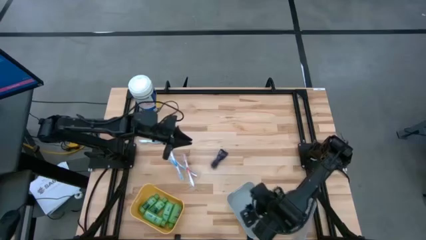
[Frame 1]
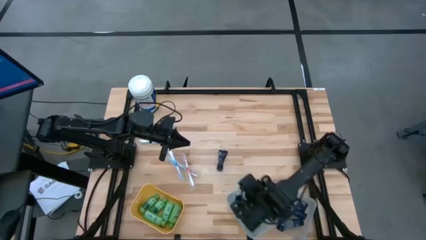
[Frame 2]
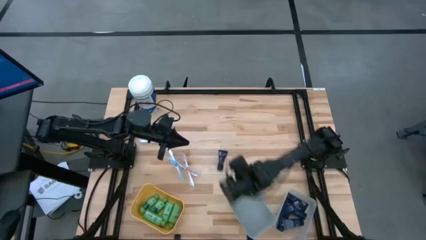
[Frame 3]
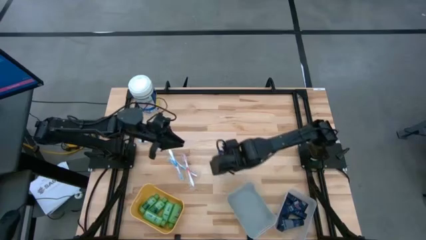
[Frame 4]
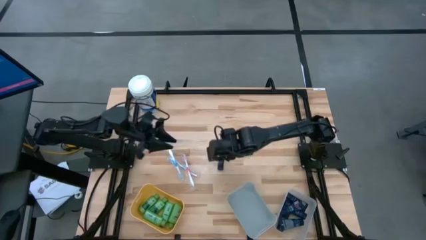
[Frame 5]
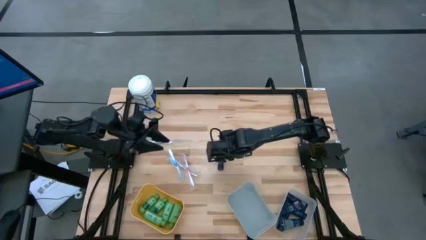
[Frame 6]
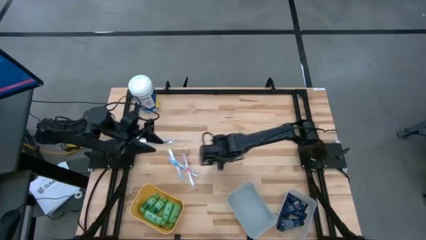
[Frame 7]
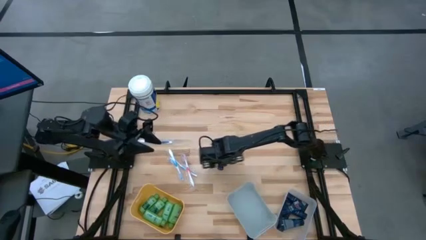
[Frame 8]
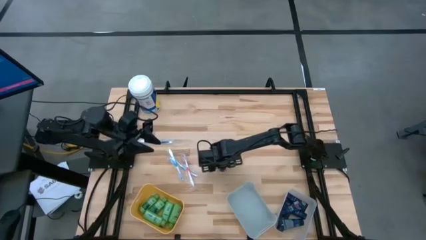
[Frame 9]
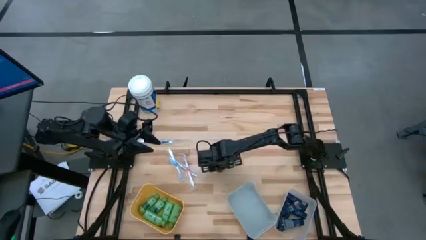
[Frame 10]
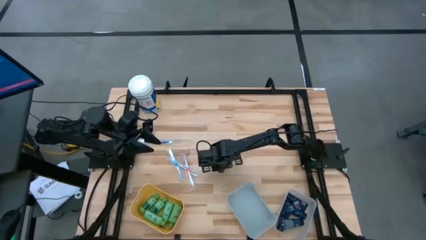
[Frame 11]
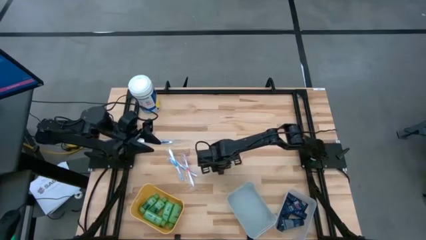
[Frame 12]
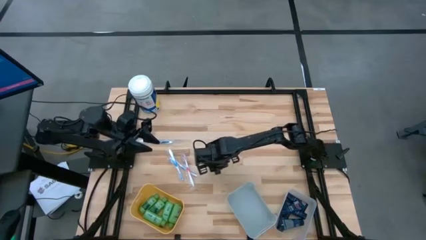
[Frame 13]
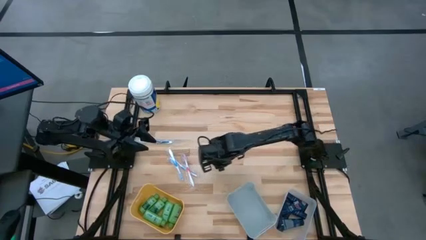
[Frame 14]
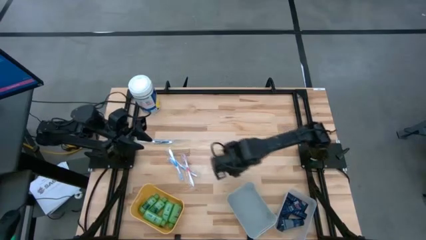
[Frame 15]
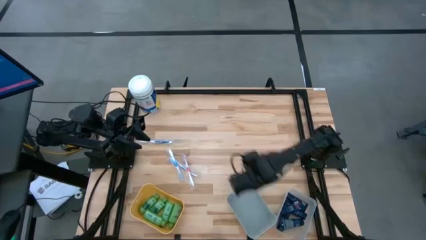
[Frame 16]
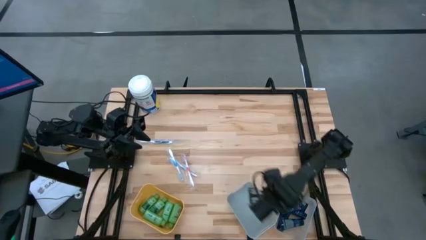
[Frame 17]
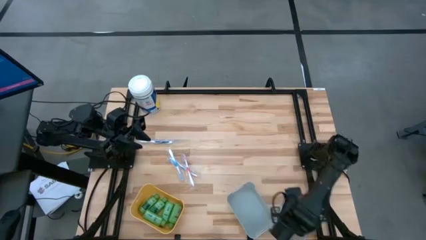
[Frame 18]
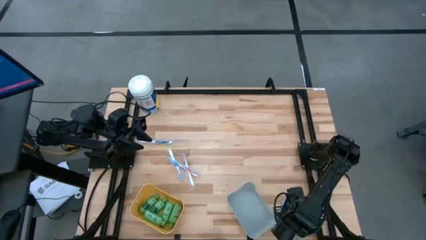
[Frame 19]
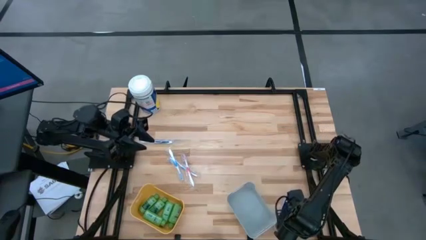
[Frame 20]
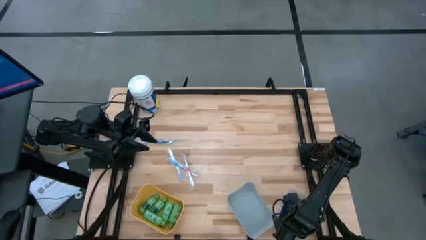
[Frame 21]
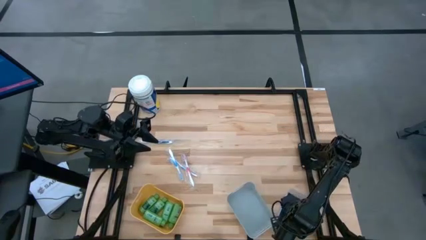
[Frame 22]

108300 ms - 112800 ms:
Task: Pick & Place Travel size toiletries
Put the blue shave cream into the transparent bin

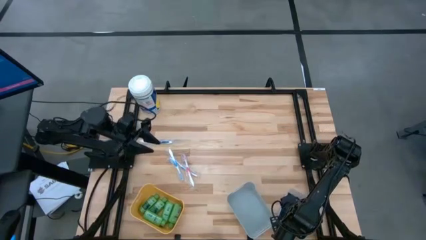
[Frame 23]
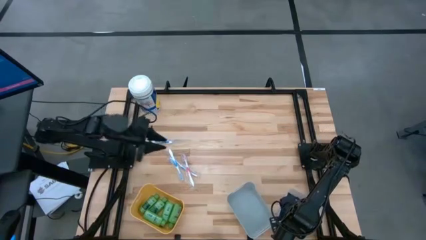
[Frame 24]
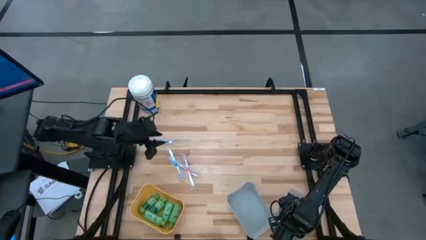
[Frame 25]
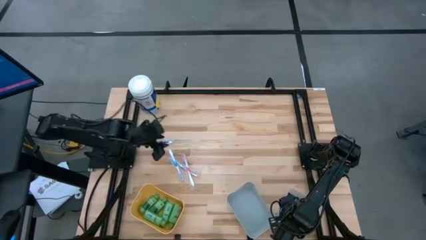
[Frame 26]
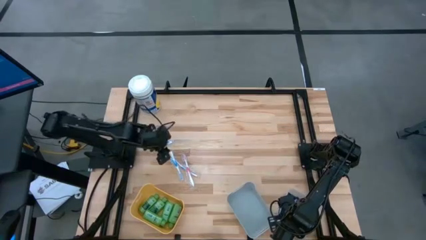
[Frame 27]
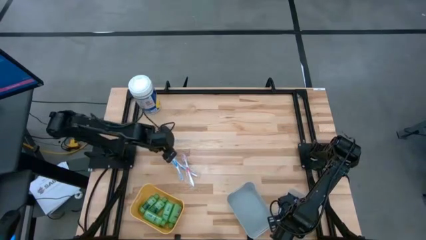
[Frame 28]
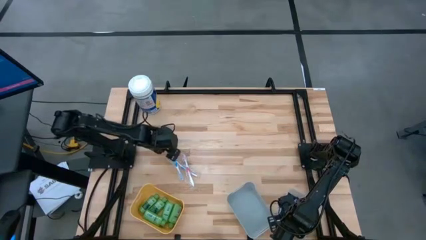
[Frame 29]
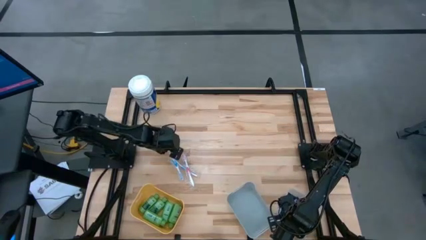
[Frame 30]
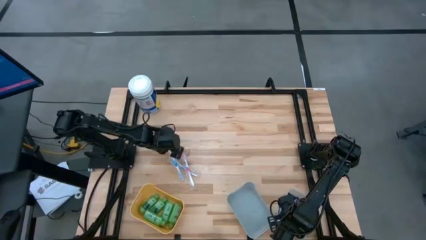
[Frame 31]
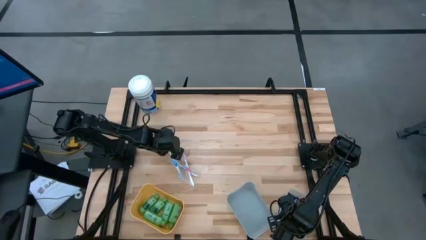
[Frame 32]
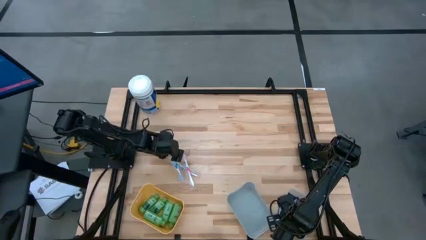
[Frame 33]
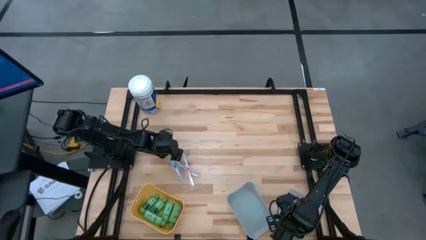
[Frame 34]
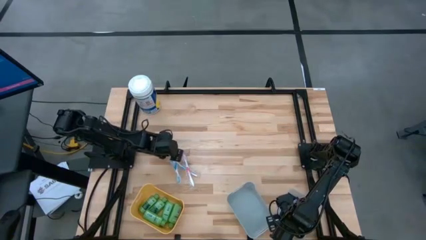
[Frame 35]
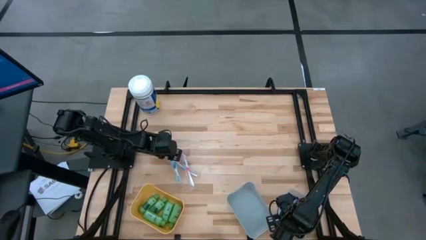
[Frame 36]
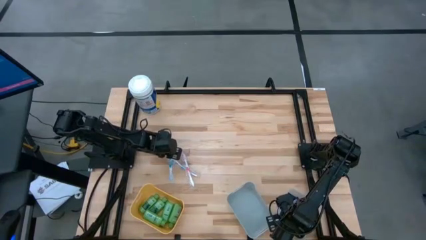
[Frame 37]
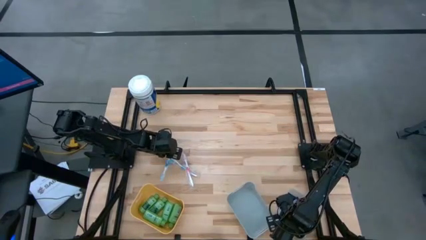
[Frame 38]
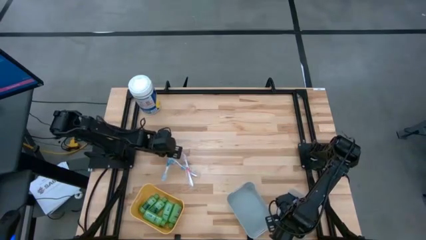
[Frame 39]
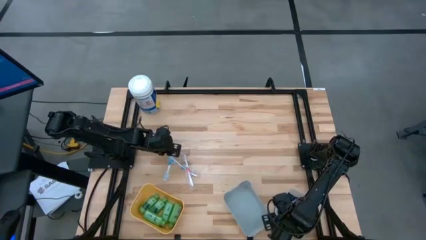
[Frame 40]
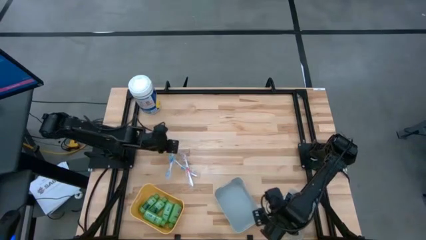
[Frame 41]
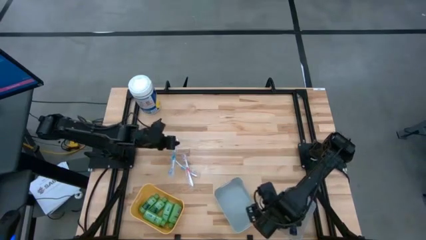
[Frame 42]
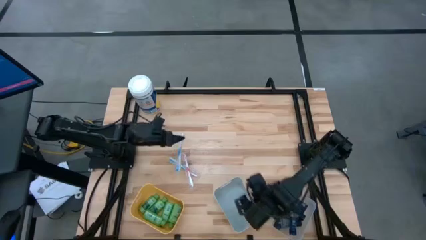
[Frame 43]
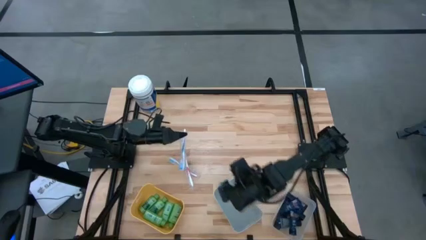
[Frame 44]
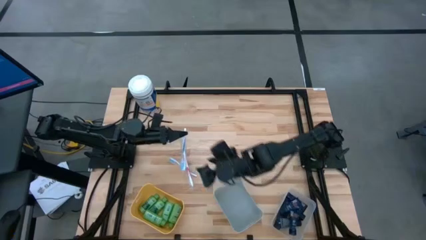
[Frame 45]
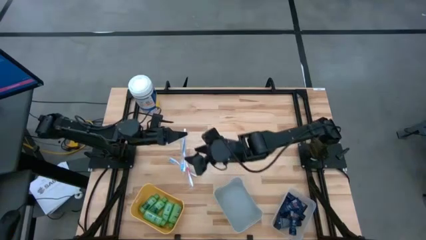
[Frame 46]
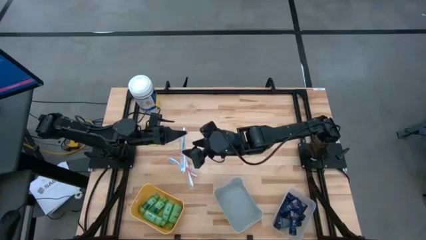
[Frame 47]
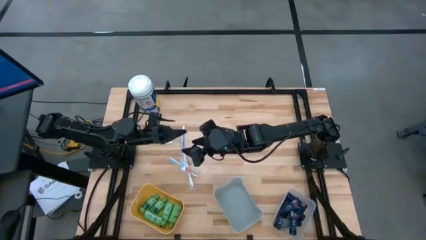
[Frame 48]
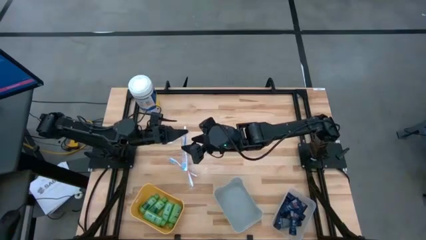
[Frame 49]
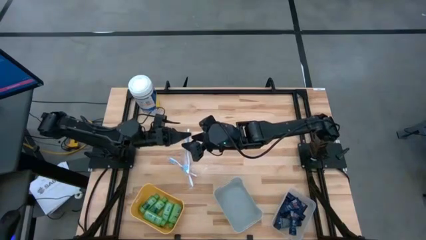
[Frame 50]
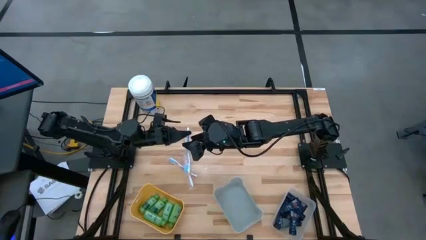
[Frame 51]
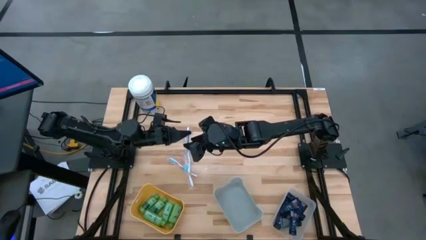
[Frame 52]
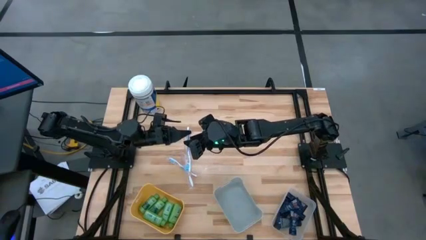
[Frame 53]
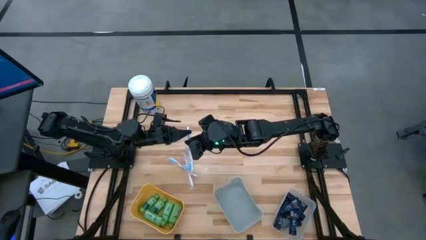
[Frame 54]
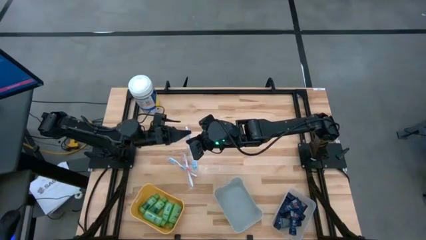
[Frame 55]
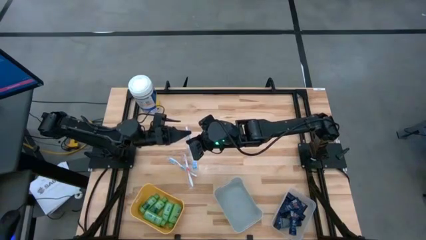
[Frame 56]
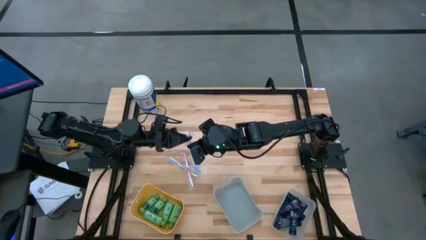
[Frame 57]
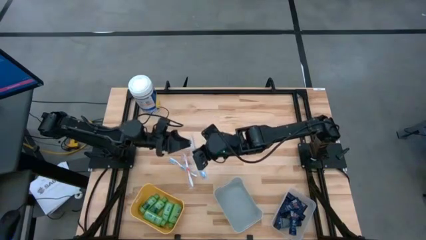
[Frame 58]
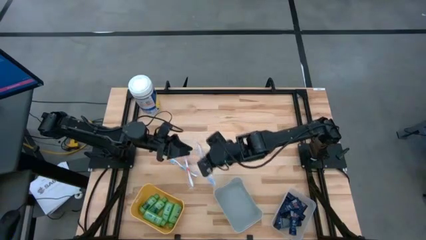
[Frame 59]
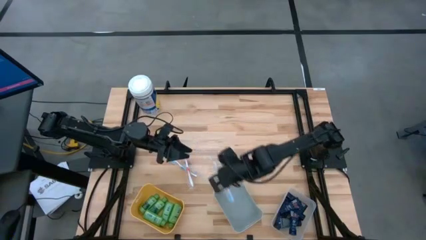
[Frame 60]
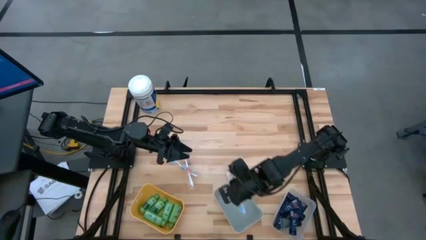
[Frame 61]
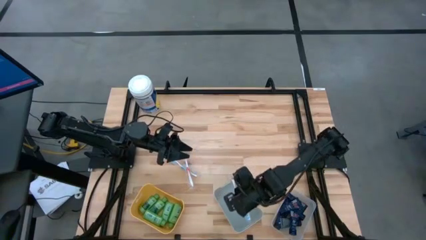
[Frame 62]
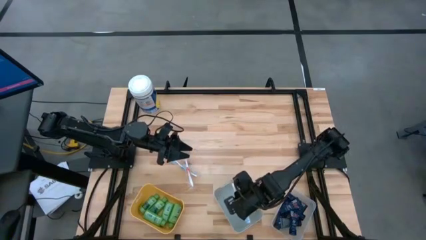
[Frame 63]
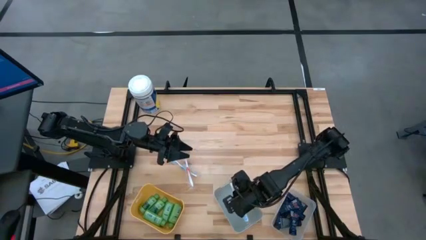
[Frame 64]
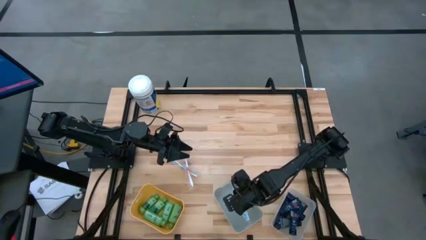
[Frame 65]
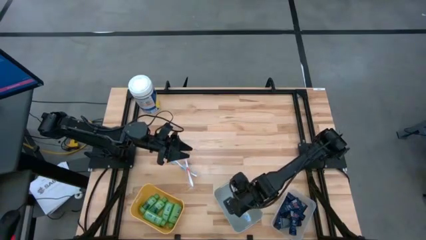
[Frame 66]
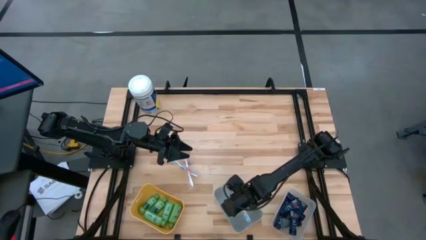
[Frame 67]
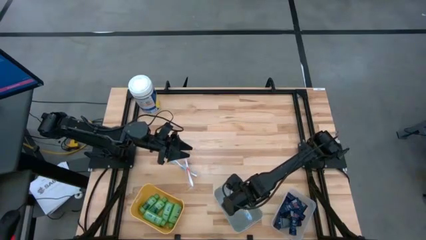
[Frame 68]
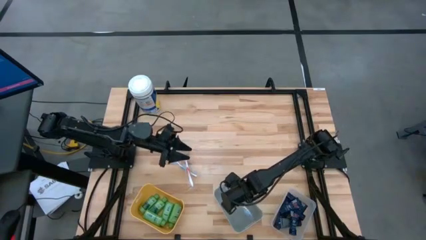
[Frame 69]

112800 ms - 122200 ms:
Put the blue toothbrush into the gray bin

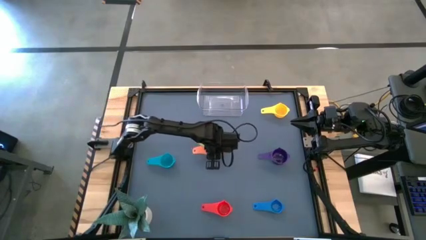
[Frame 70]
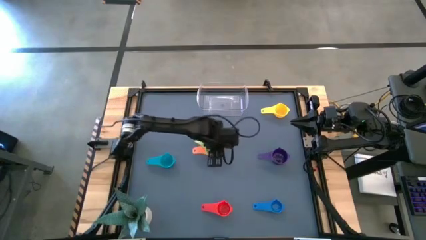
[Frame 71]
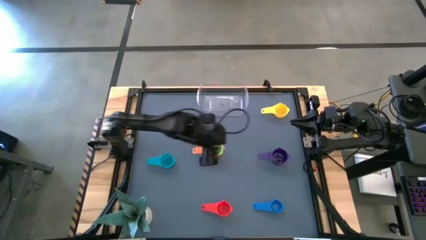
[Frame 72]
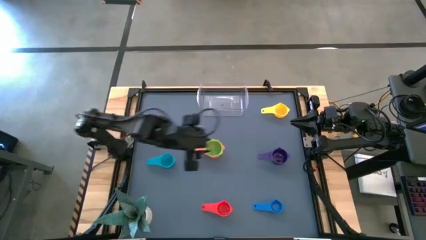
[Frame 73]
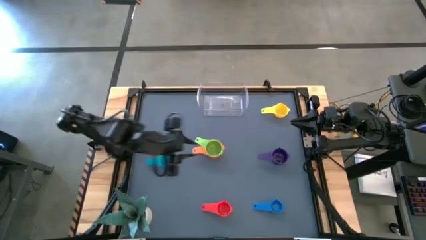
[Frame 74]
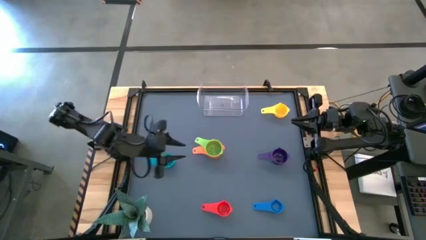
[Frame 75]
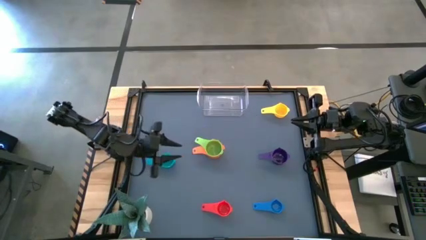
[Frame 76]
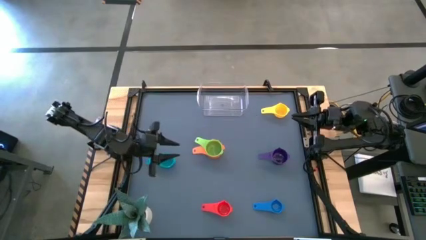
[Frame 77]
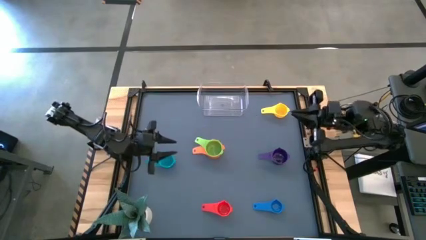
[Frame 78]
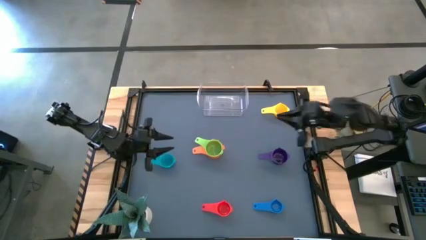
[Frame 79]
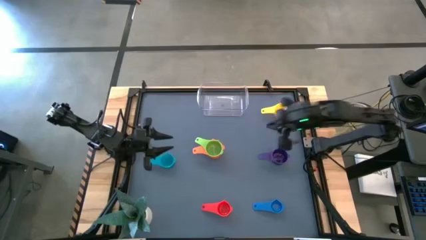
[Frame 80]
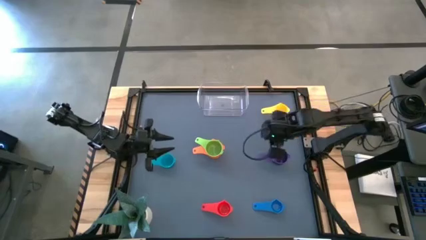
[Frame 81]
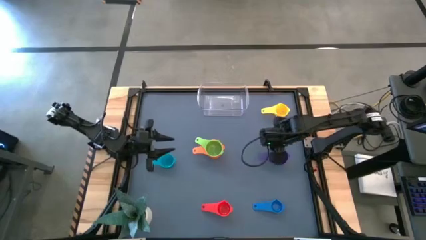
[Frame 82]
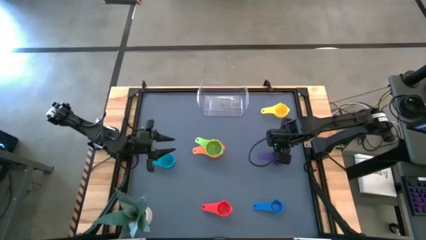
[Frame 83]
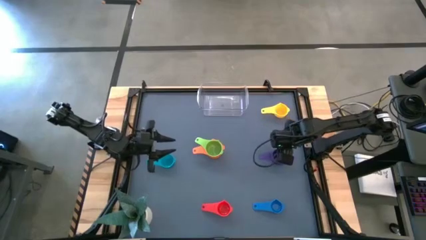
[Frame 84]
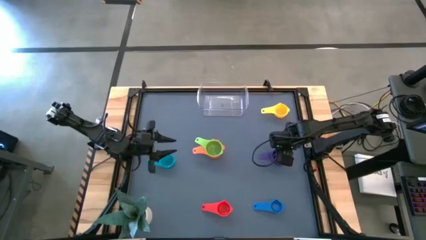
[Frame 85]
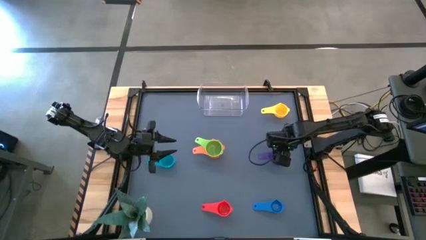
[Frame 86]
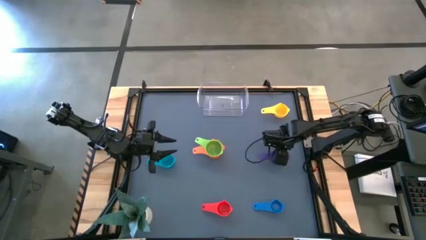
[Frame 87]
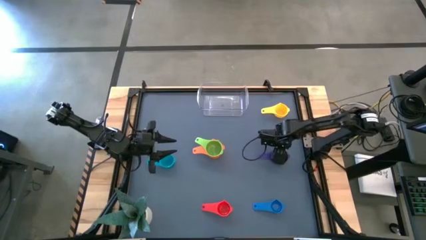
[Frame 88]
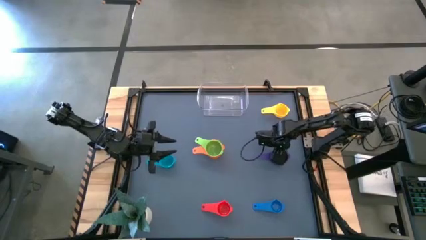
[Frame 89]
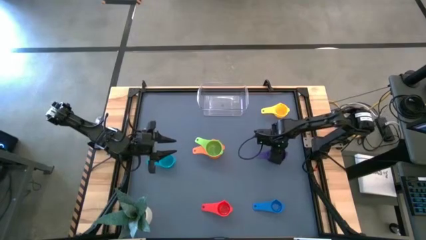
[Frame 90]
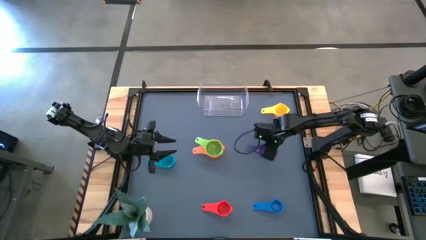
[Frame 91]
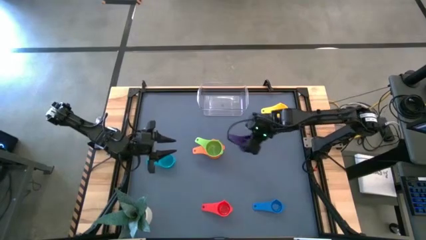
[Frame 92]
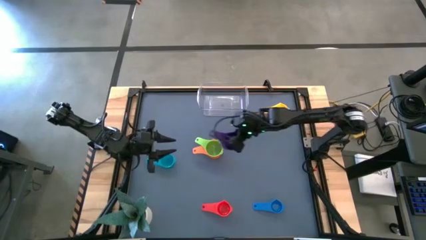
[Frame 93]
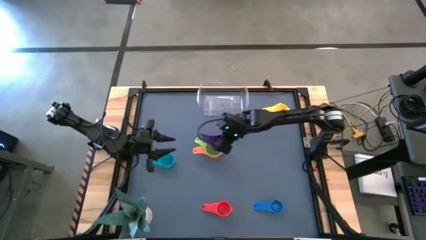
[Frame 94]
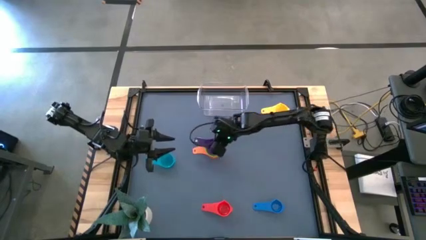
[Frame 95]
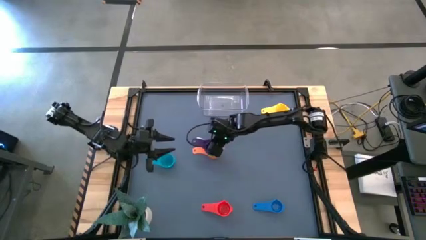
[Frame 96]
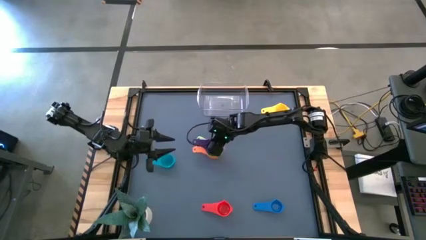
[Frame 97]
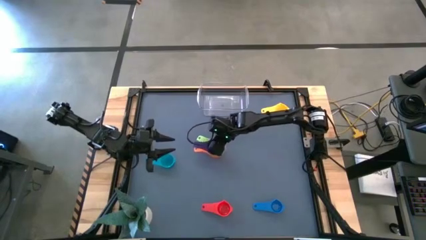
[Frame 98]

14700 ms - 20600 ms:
Task: Nest measuring cups in basket
Stack the purple measuring cup on top of the green measuring cup
